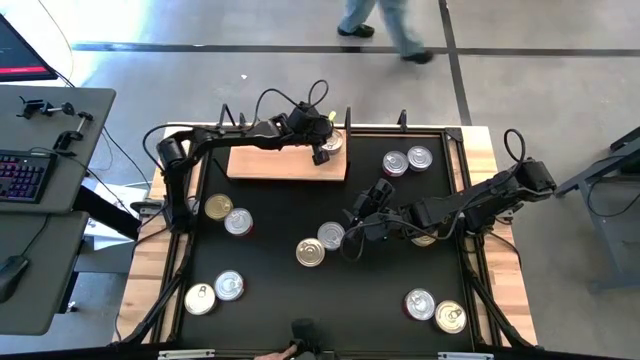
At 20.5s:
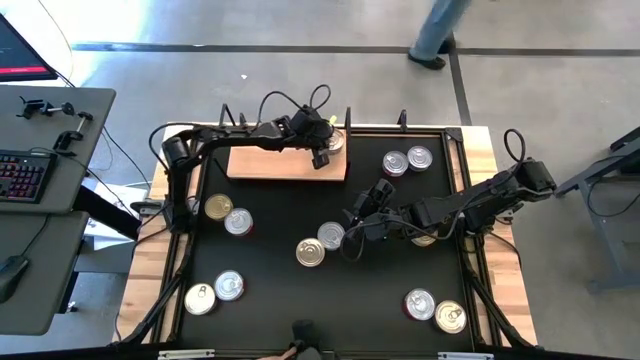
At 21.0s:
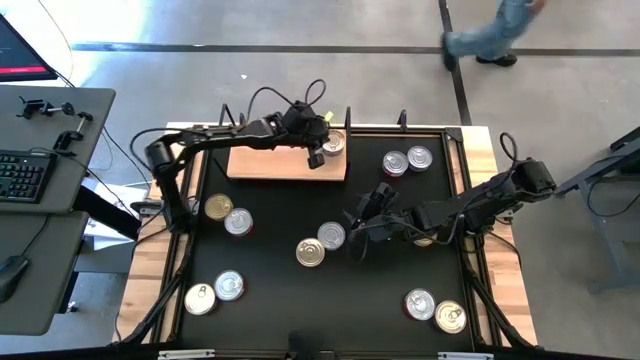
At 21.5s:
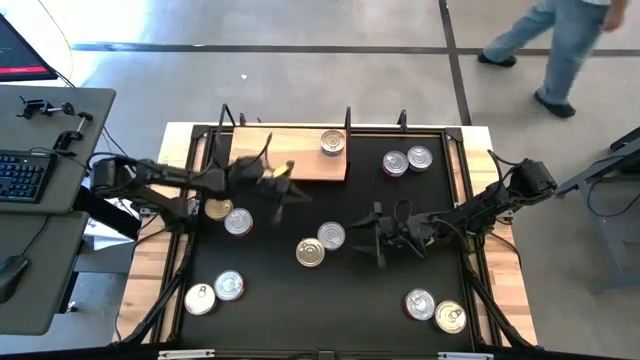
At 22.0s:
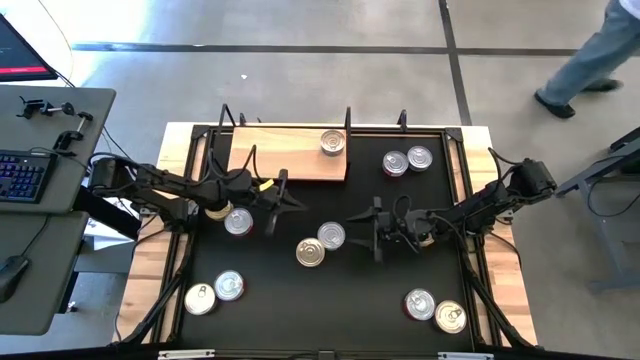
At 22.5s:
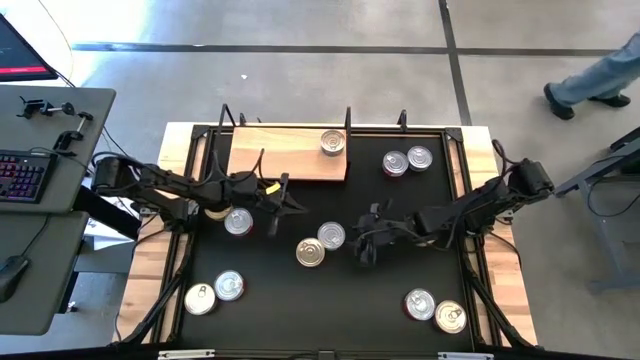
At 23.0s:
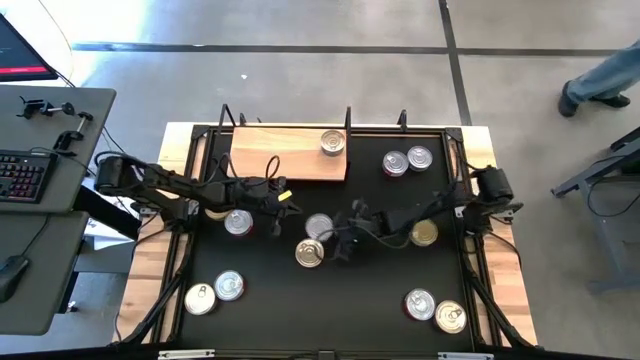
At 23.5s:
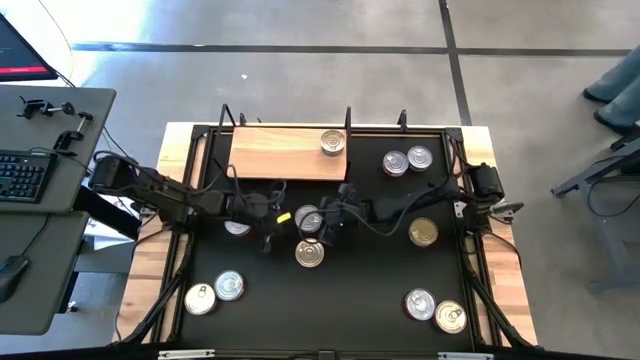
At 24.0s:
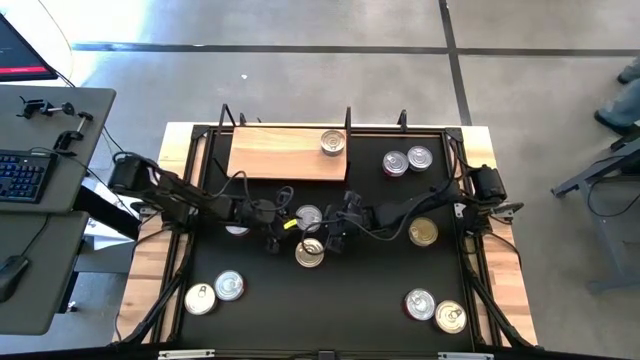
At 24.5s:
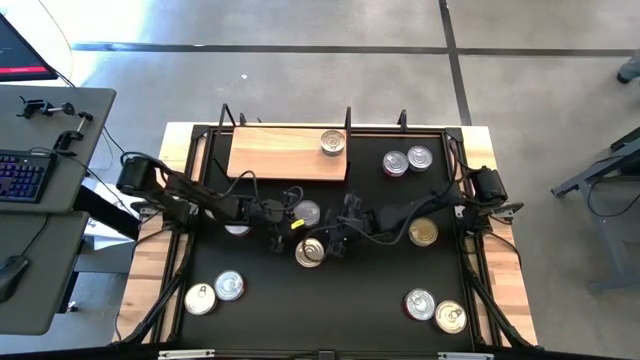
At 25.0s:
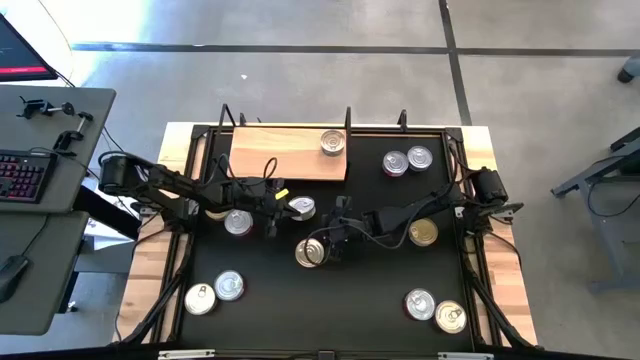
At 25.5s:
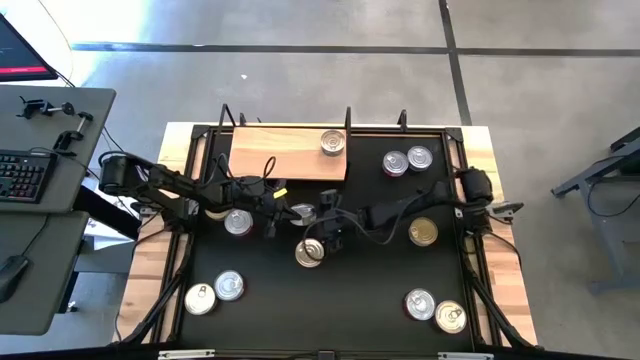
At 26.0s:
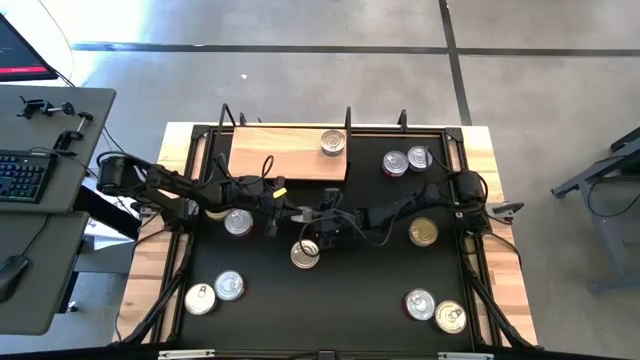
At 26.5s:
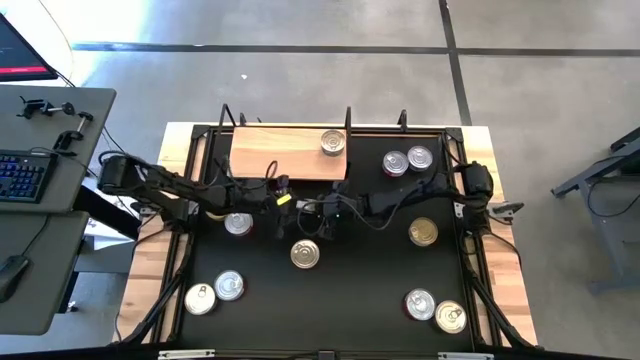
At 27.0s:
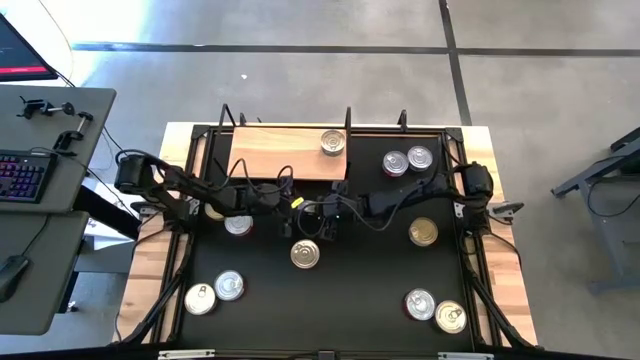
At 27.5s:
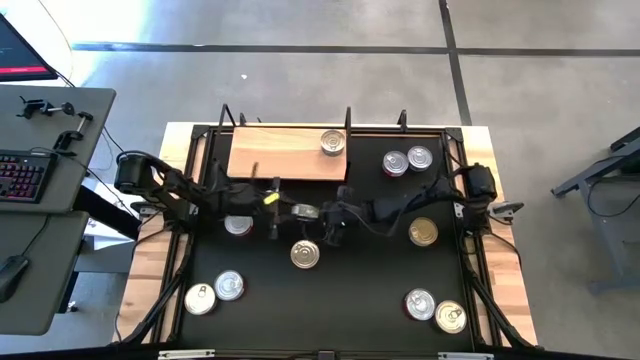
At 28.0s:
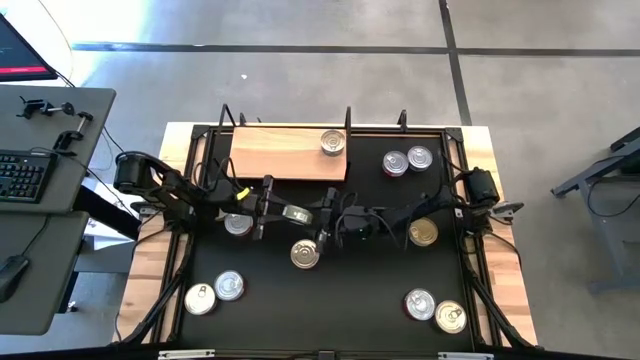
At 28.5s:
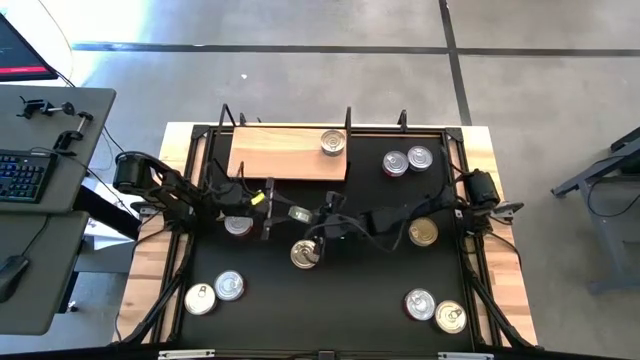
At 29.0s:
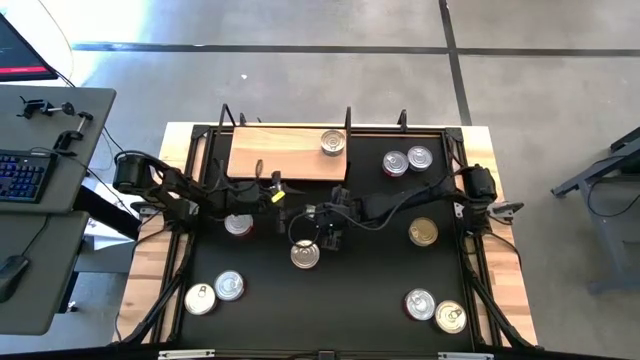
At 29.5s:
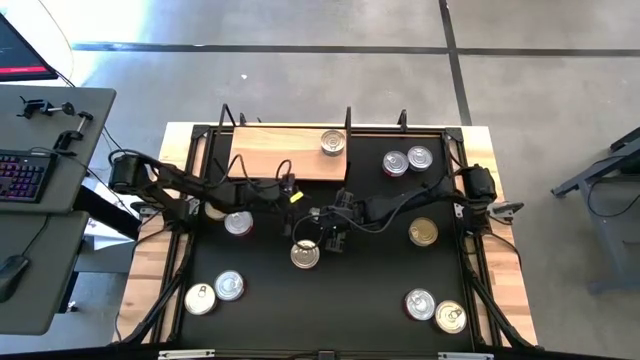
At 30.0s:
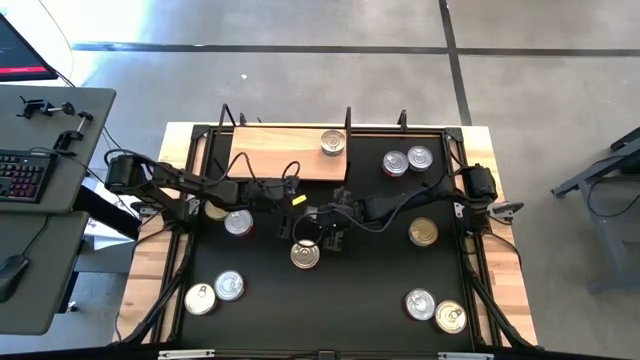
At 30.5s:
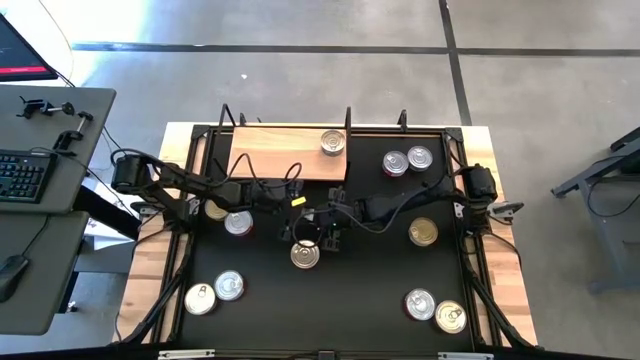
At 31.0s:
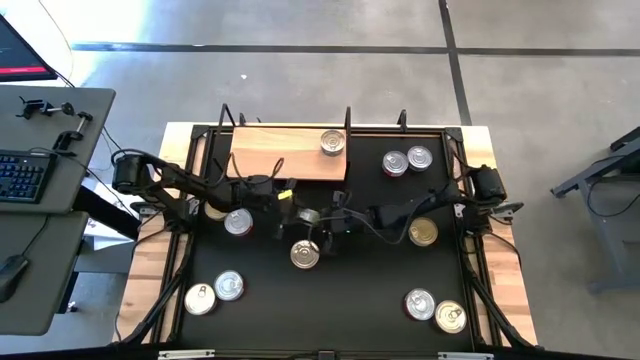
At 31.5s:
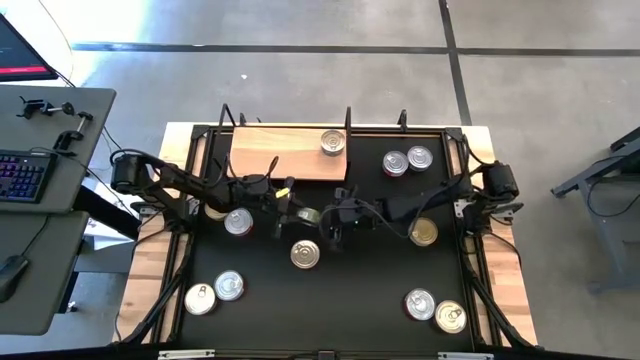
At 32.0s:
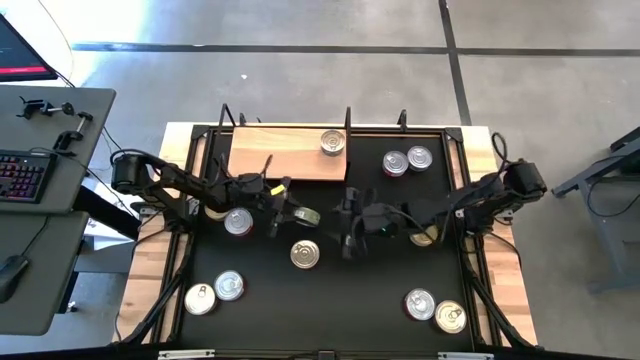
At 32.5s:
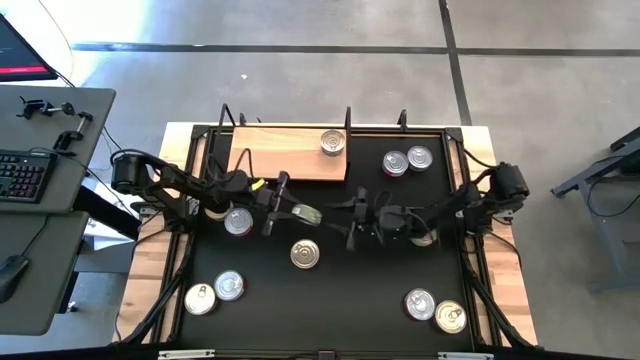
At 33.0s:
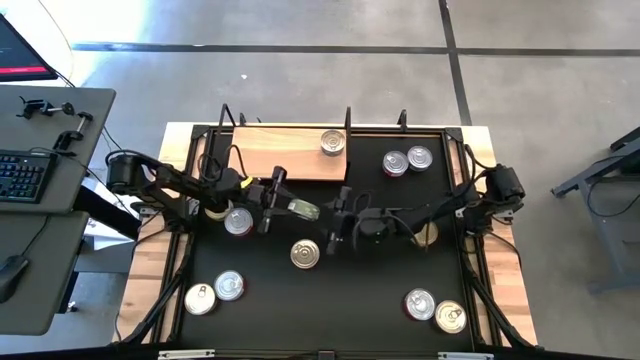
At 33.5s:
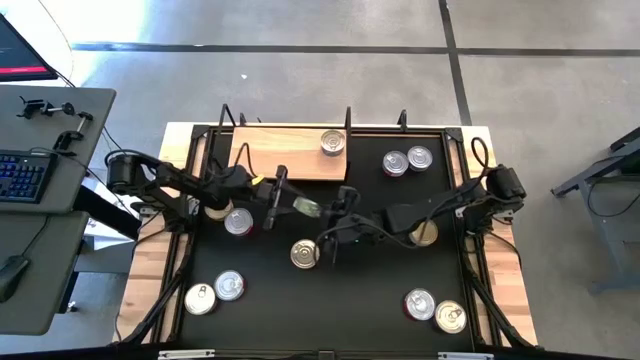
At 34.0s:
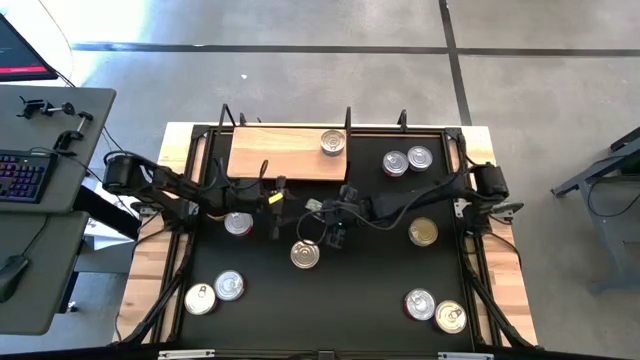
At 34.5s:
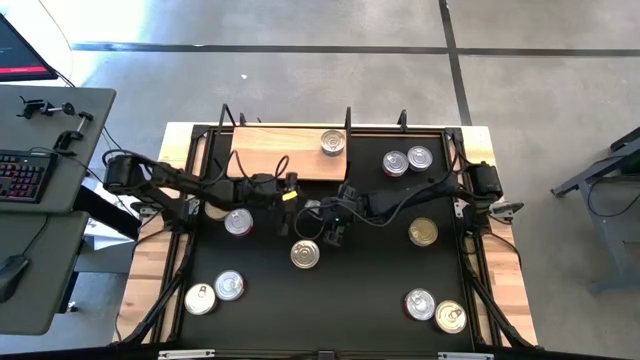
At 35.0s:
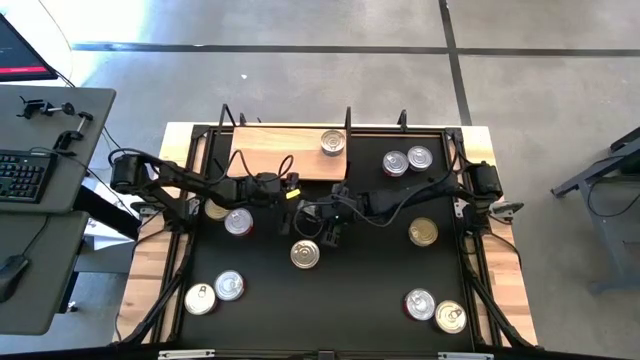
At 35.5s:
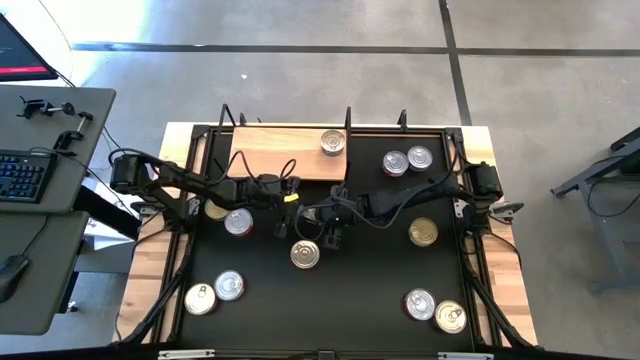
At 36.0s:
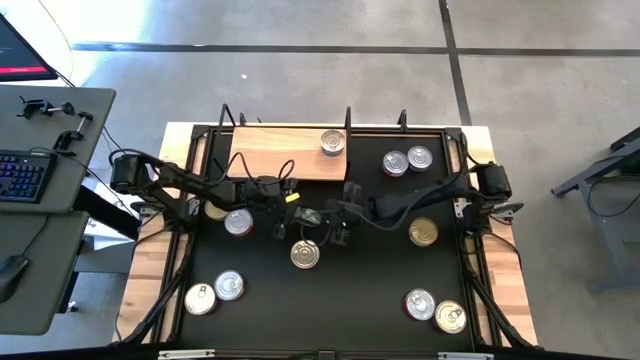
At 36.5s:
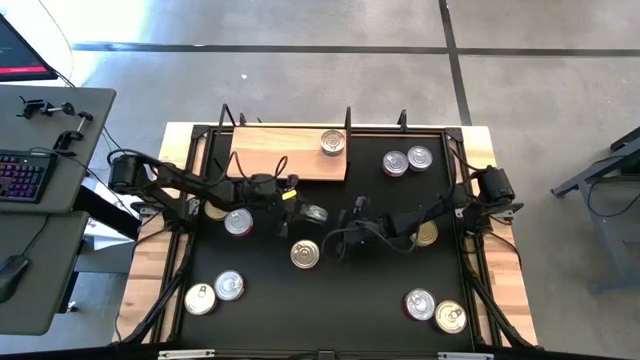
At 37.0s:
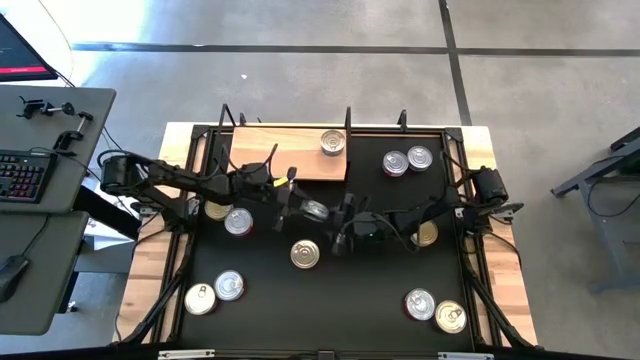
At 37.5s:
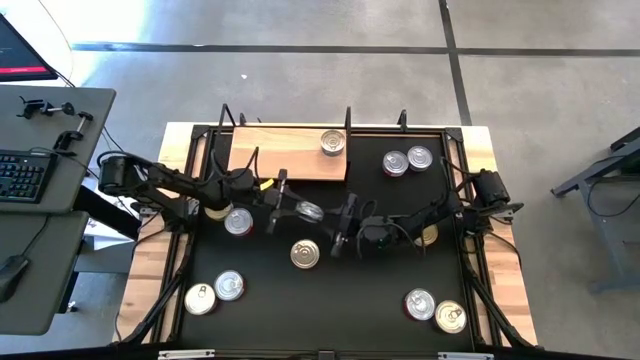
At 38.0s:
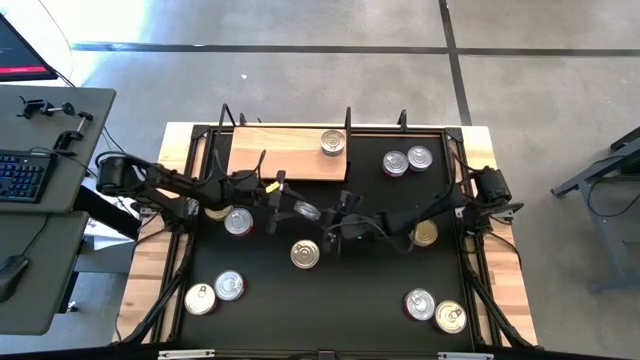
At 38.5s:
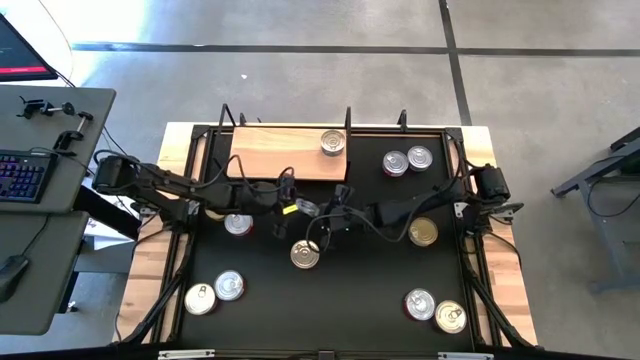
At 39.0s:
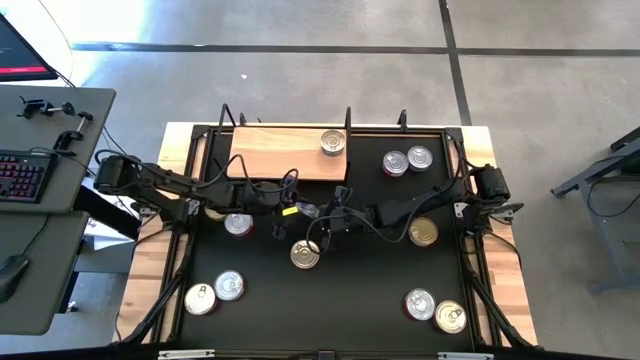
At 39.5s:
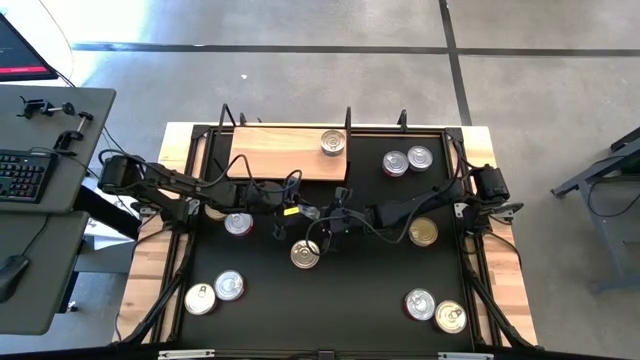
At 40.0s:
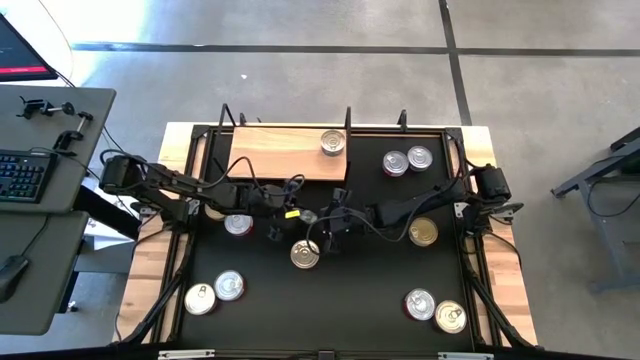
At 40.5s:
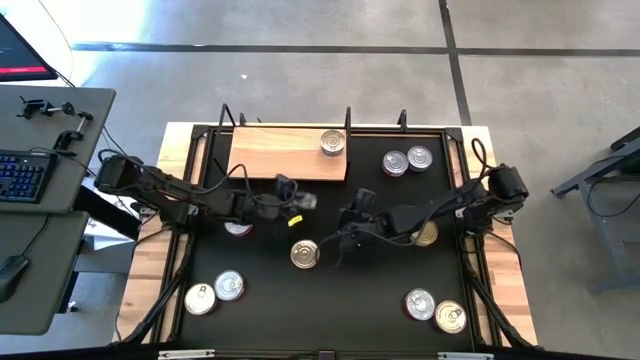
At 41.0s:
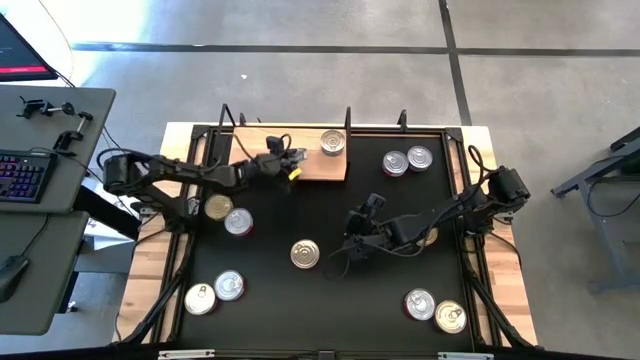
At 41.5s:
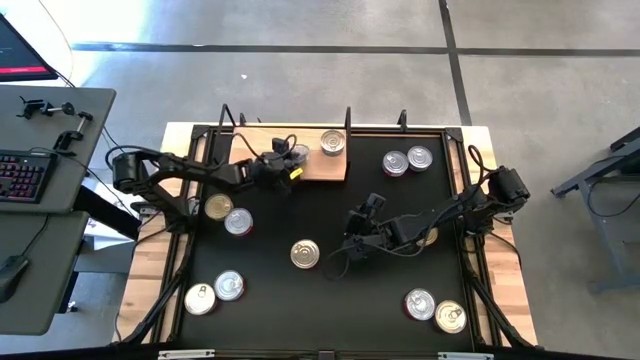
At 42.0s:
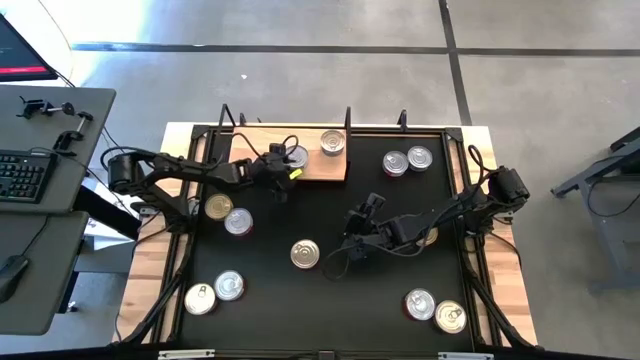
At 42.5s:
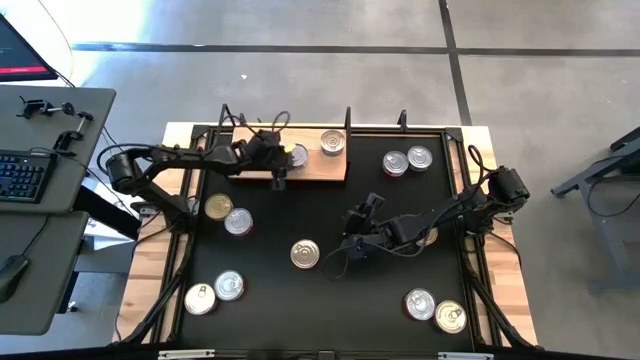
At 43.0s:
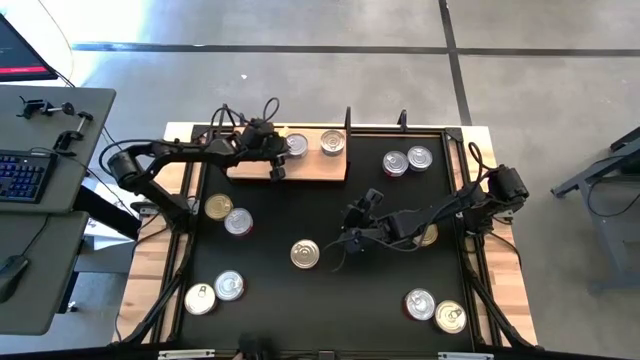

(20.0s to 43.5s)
Task: Stack canned seafood by type on shelf
Put the green tuna can on the shelf
